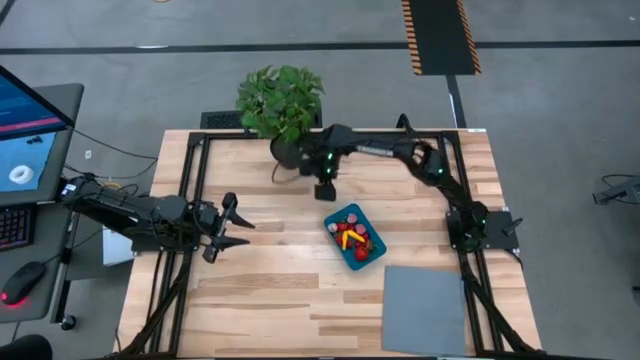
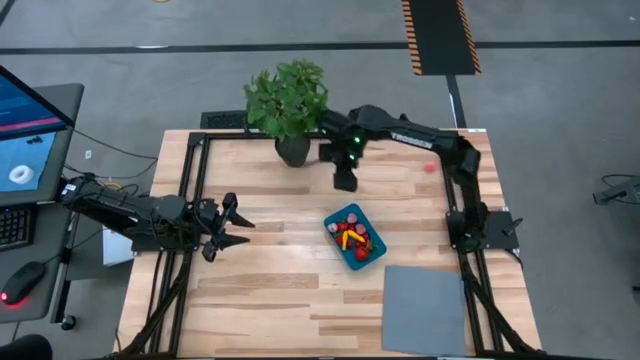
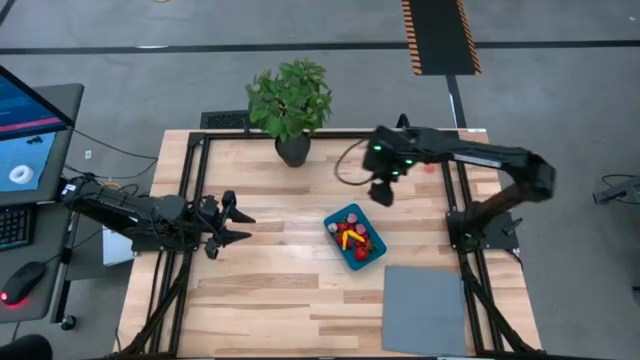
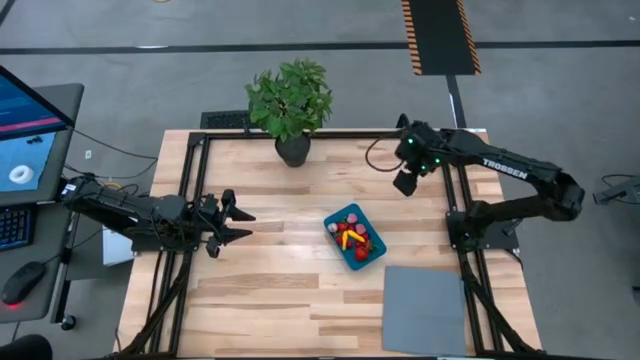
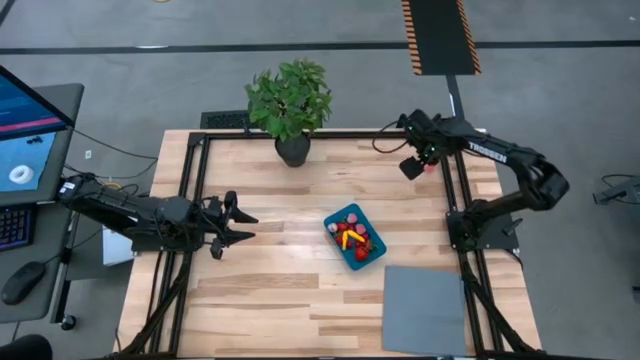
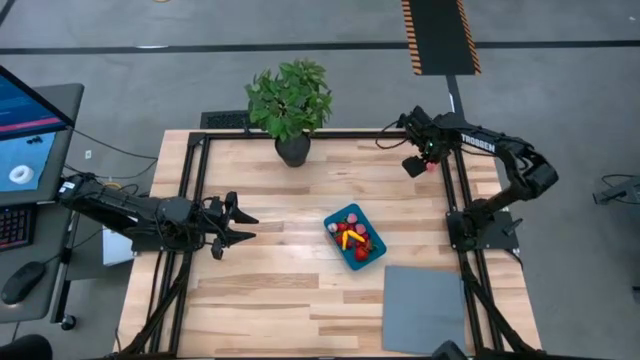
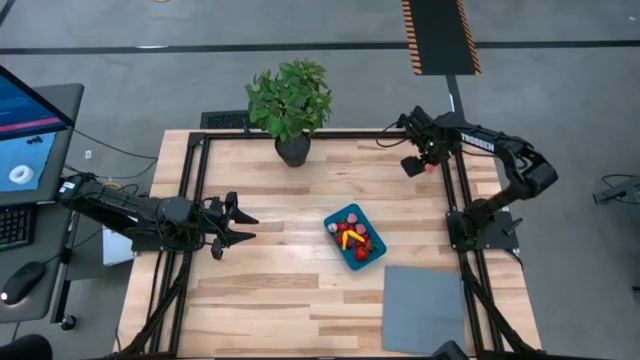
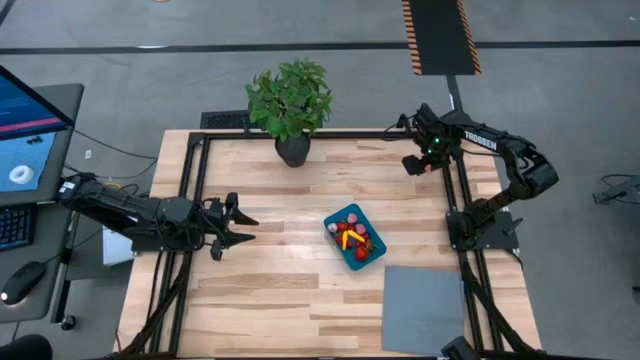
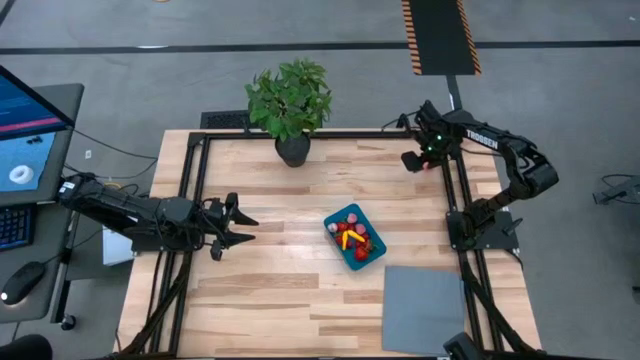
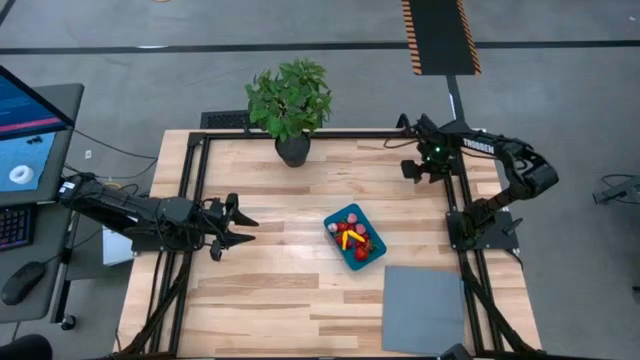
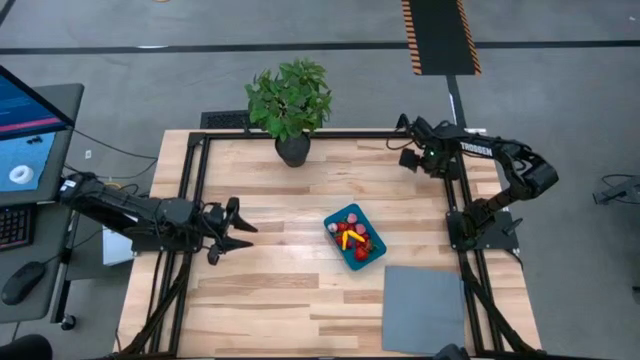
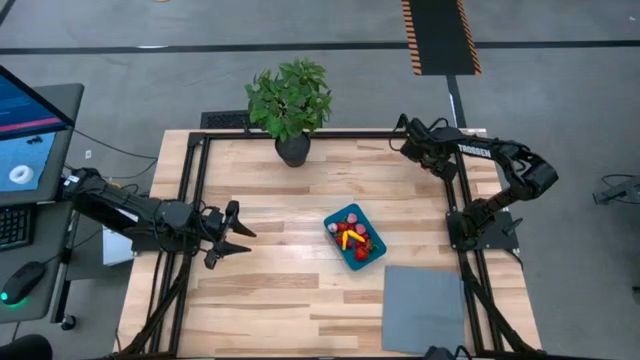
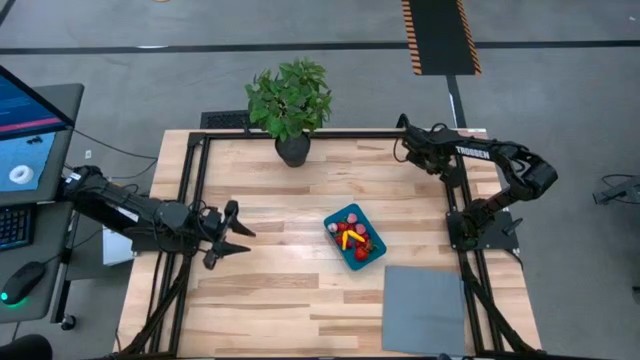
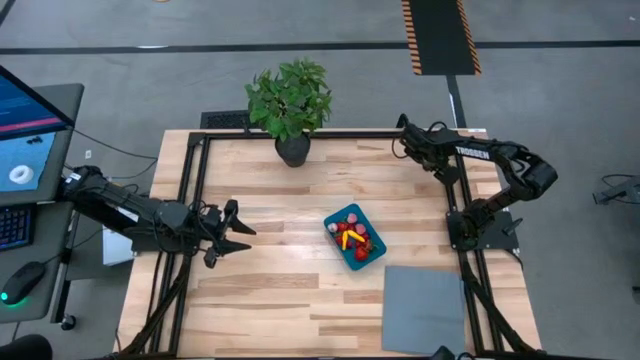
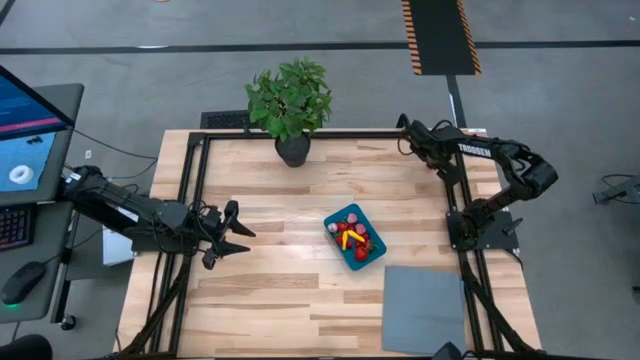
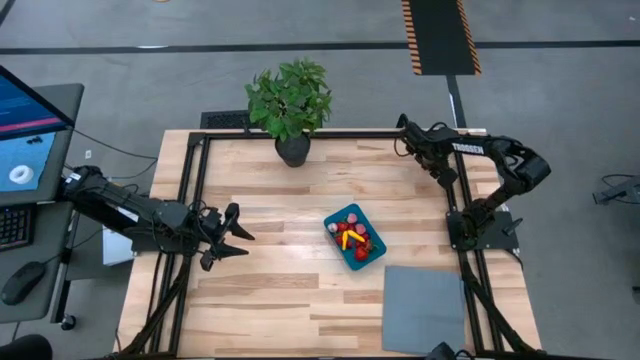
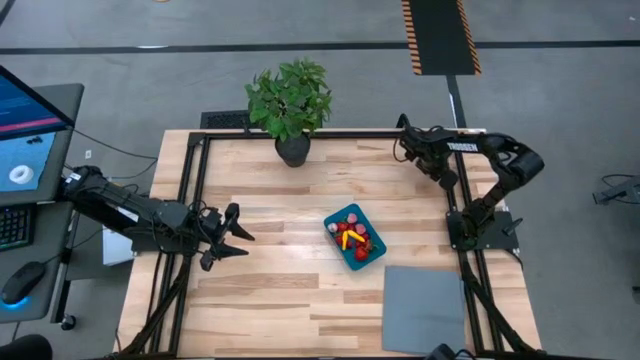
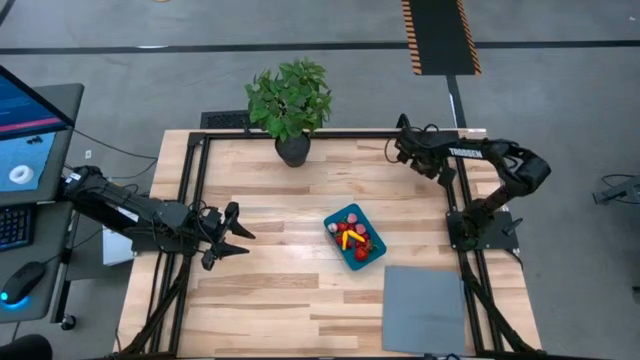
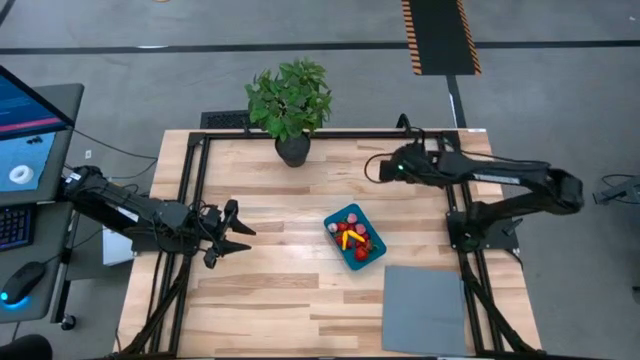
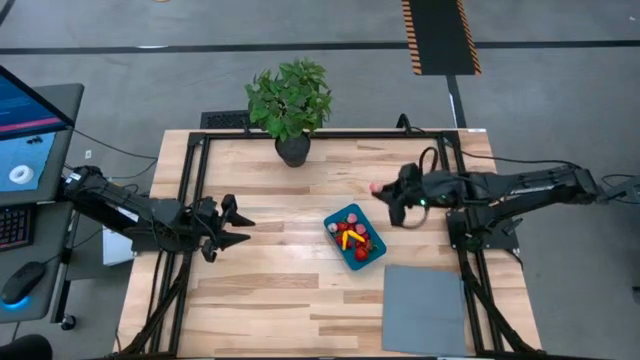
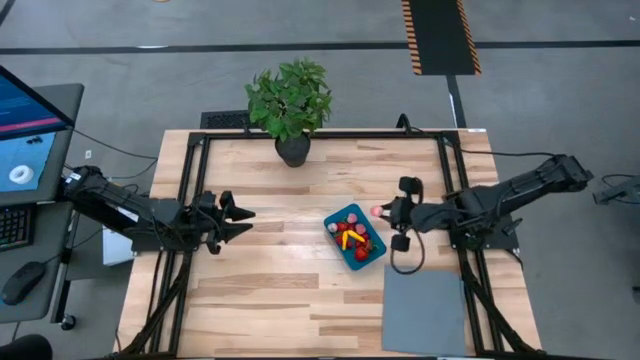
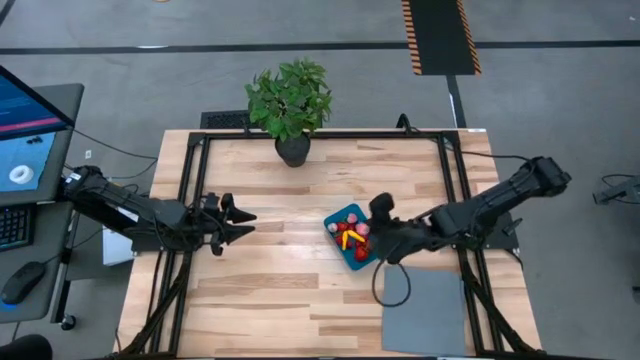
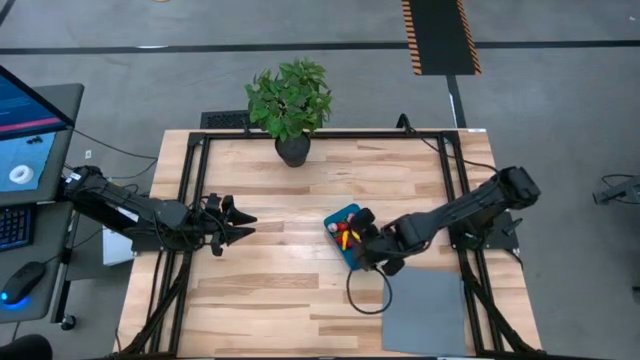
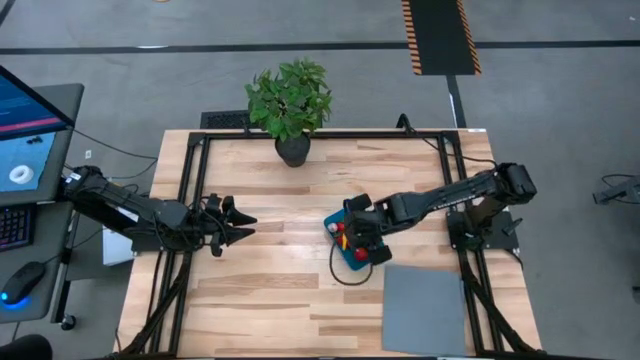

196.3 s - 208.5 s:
Task: Pick and placing Produce into tupperware
Put the apricot into the blue bin

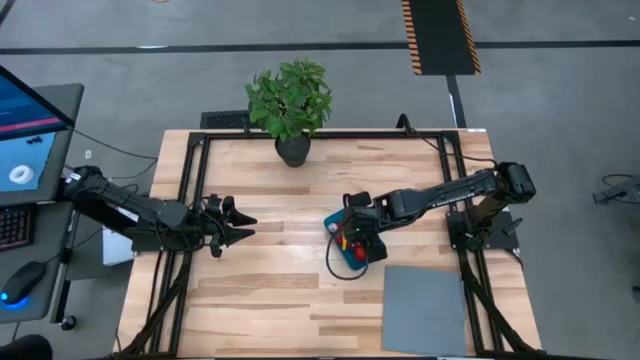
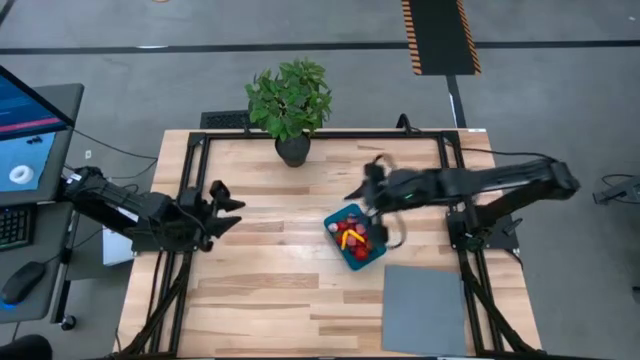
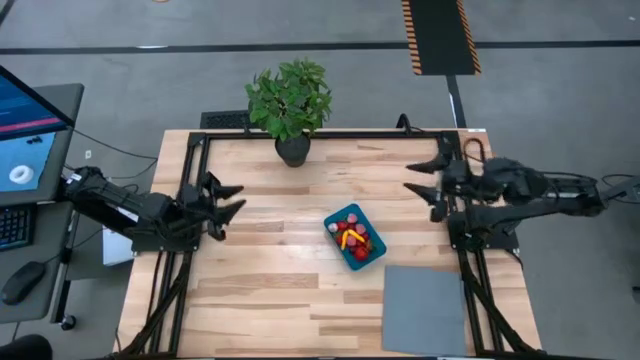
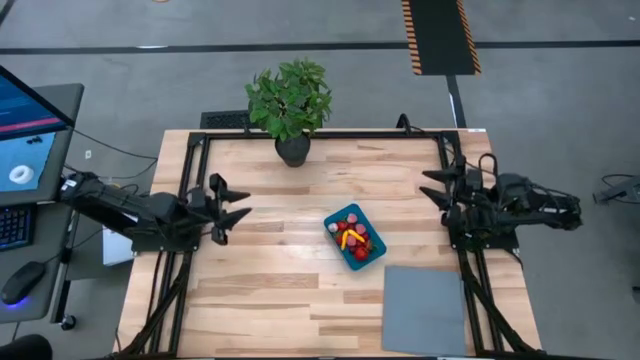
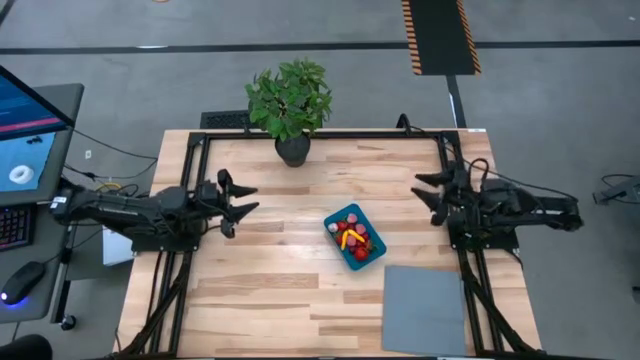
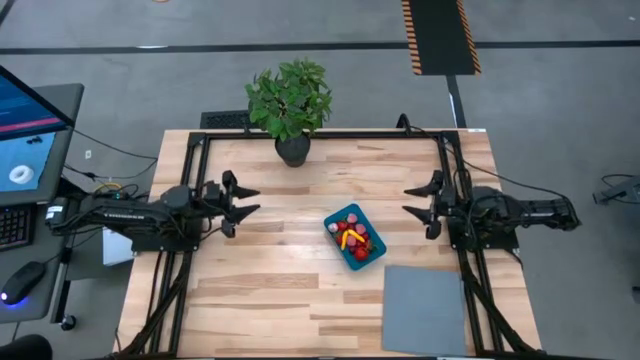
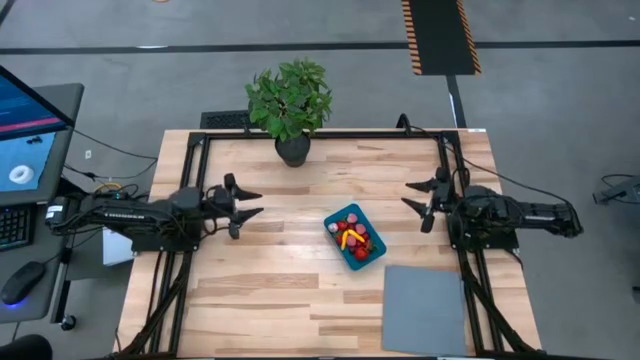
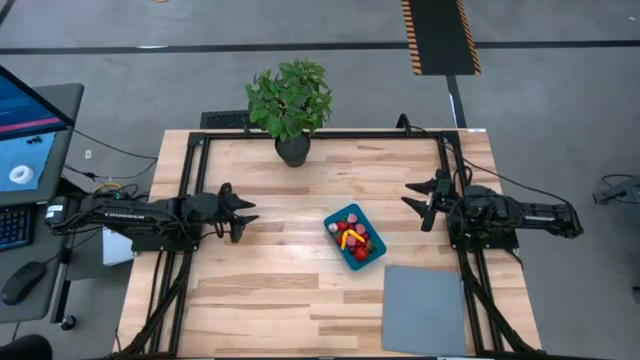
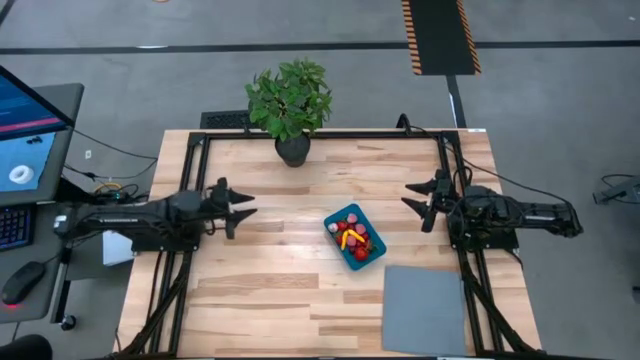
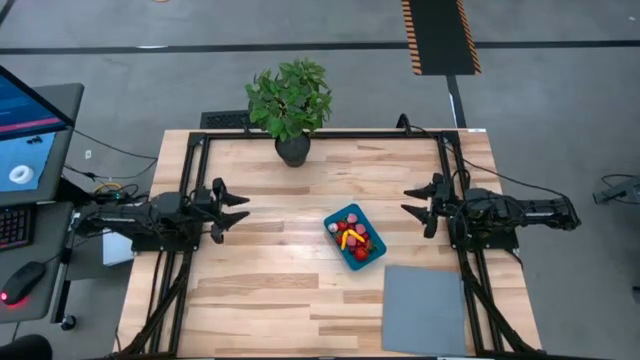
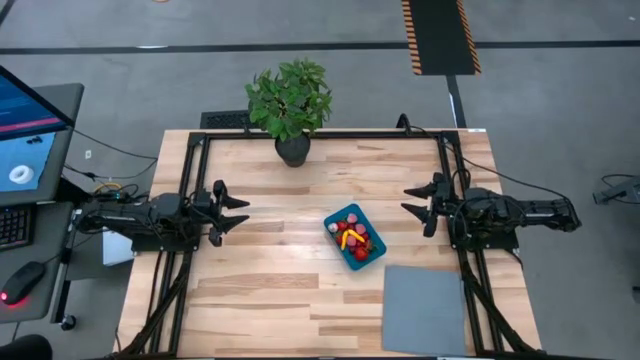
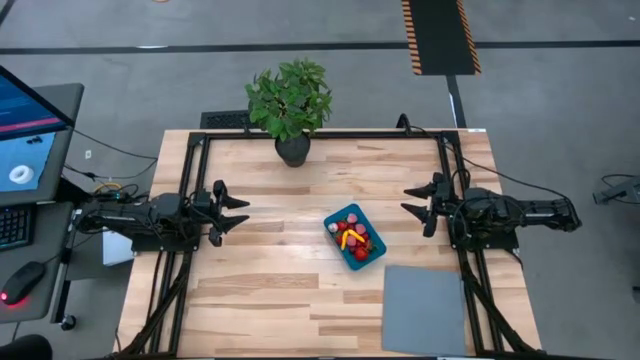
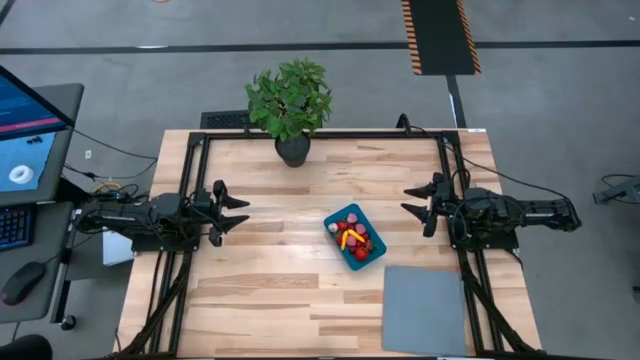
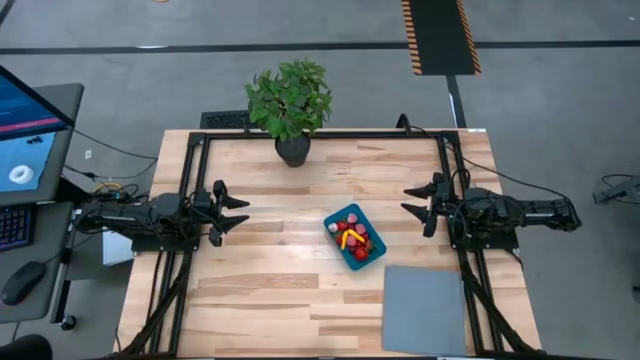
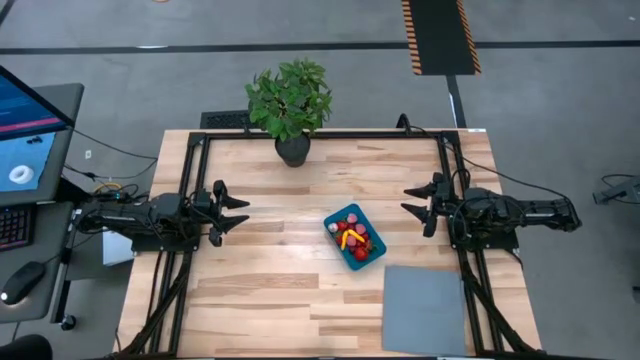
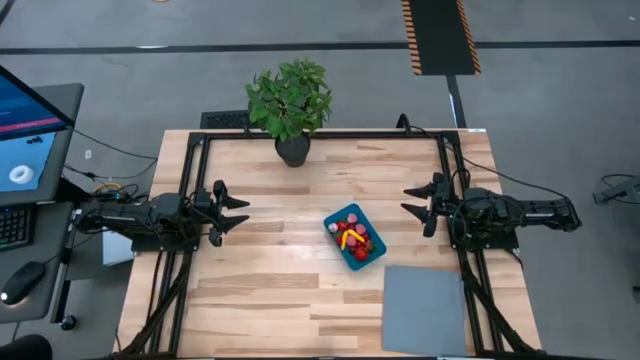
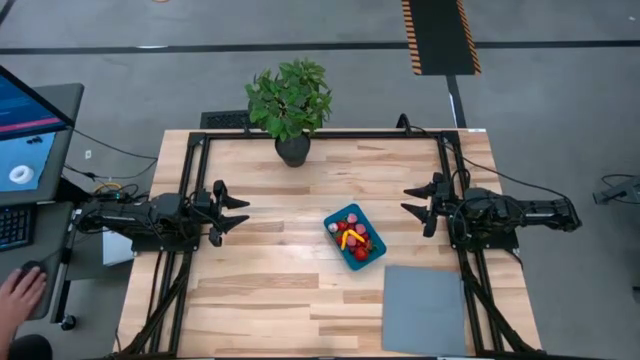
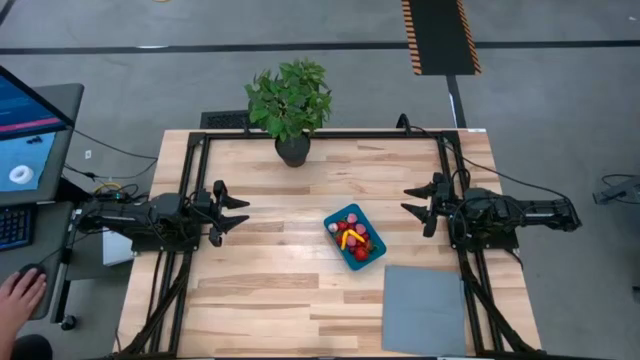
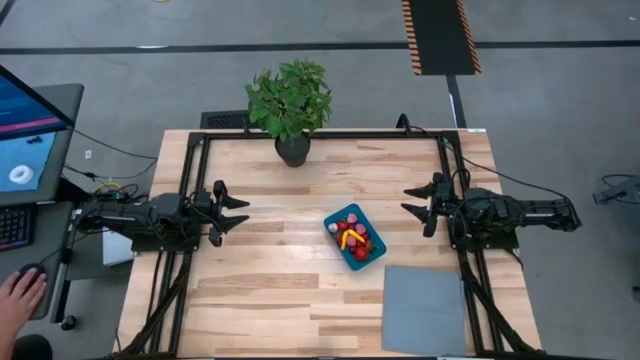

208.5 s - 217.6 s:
Return to Home Position
